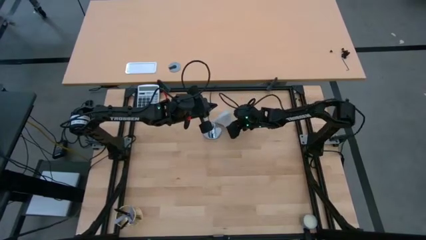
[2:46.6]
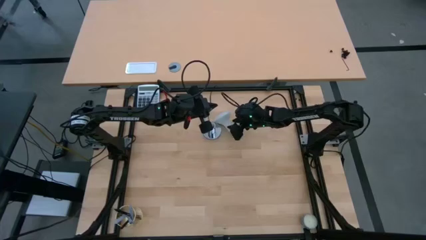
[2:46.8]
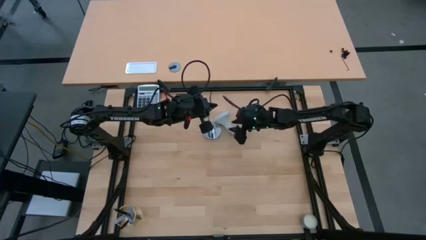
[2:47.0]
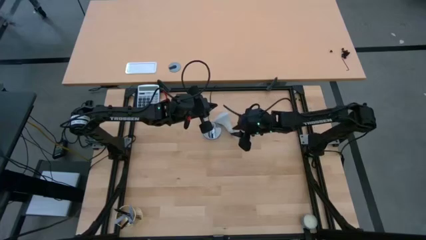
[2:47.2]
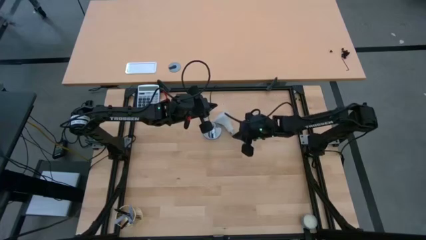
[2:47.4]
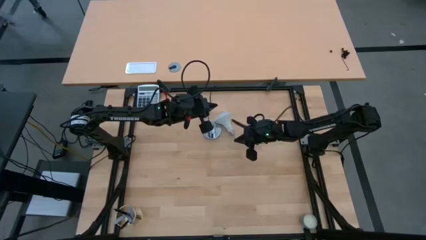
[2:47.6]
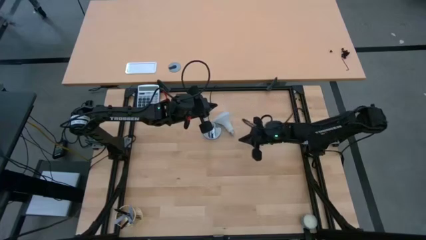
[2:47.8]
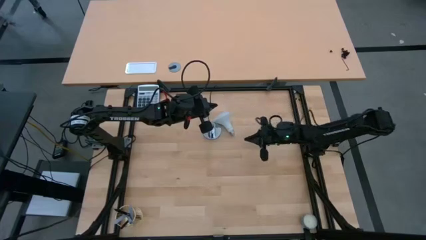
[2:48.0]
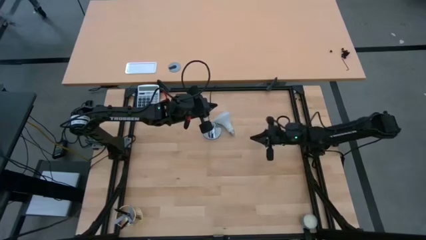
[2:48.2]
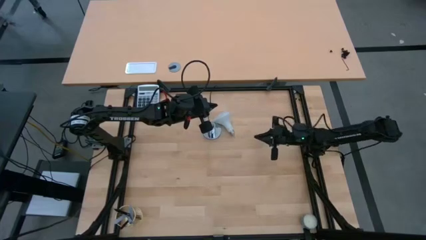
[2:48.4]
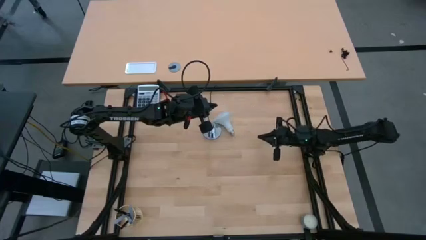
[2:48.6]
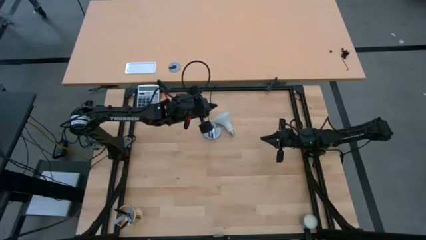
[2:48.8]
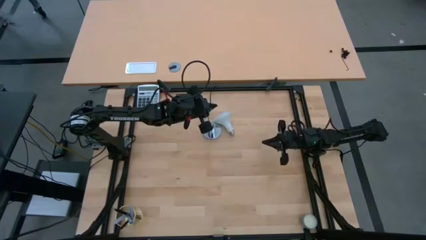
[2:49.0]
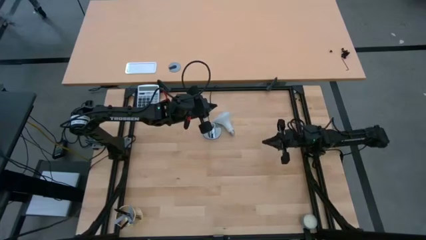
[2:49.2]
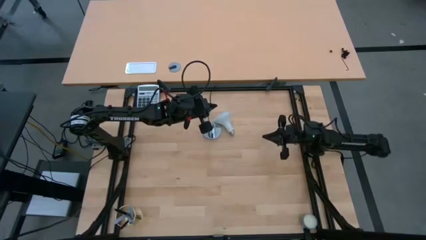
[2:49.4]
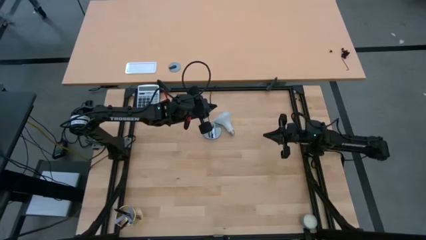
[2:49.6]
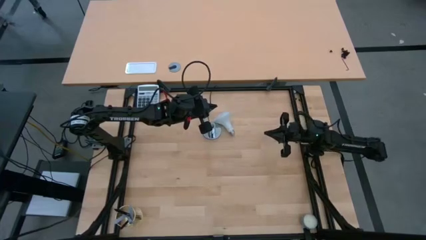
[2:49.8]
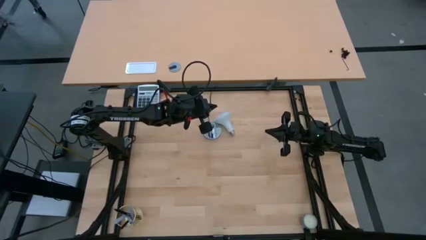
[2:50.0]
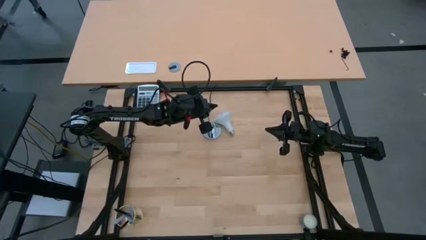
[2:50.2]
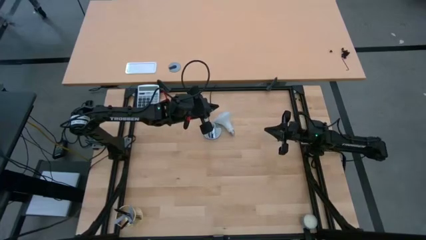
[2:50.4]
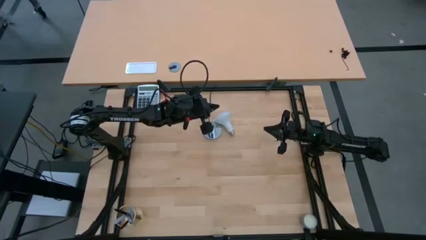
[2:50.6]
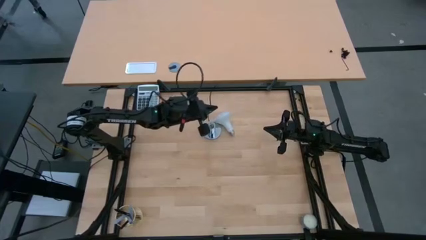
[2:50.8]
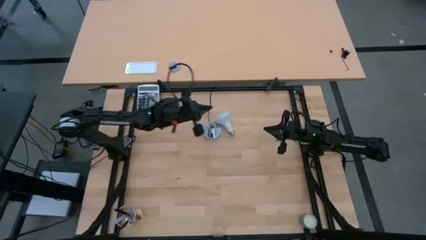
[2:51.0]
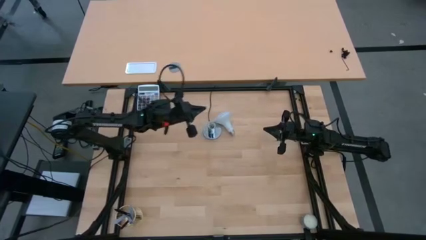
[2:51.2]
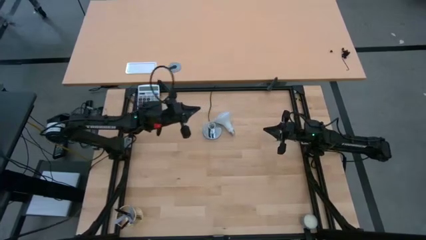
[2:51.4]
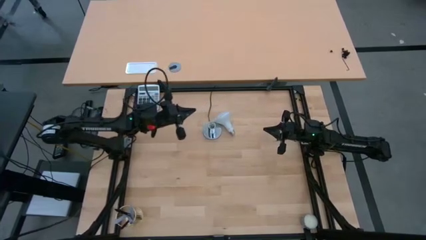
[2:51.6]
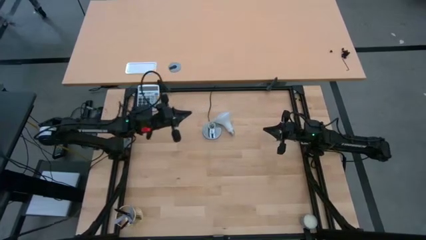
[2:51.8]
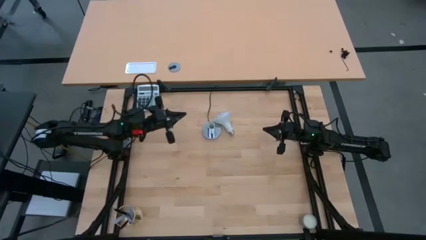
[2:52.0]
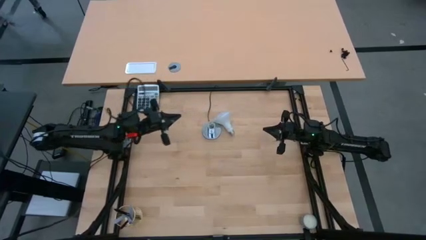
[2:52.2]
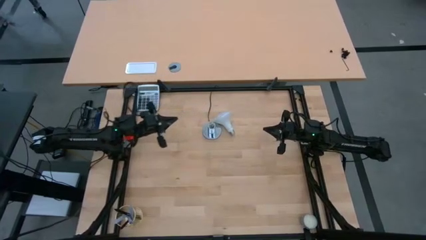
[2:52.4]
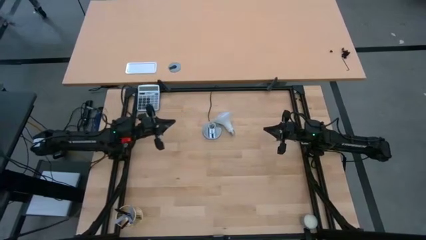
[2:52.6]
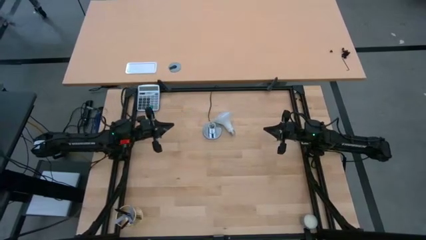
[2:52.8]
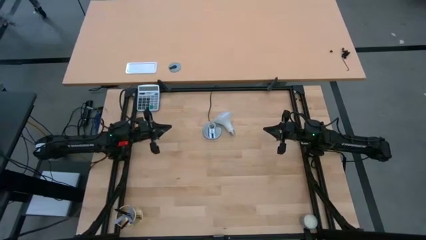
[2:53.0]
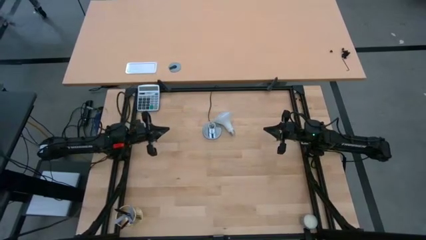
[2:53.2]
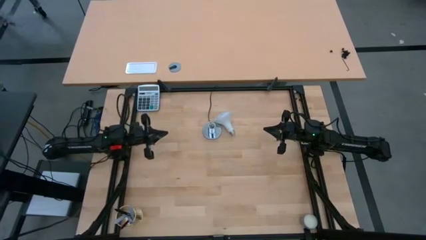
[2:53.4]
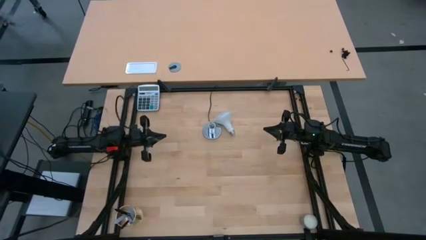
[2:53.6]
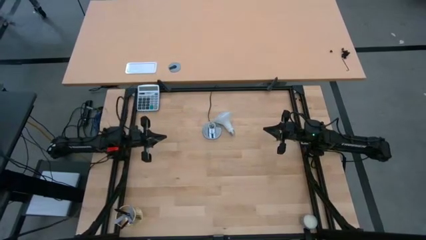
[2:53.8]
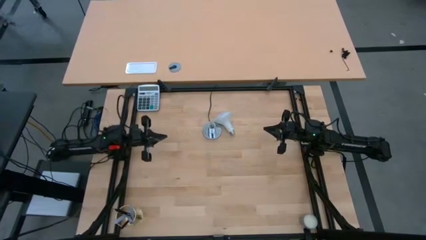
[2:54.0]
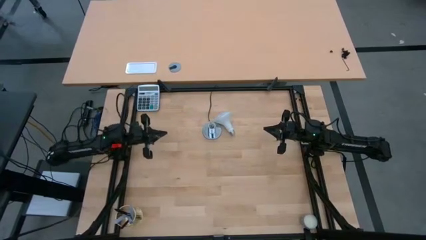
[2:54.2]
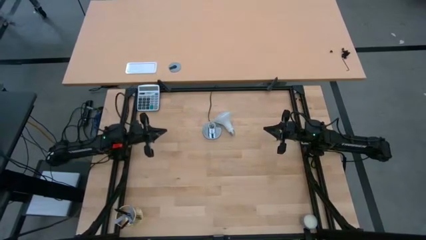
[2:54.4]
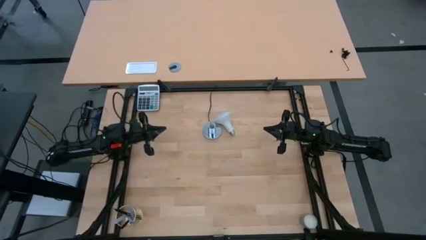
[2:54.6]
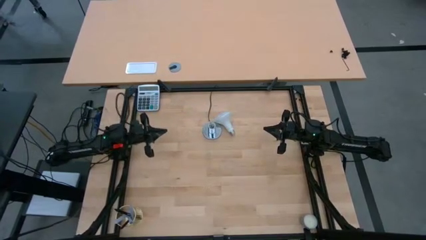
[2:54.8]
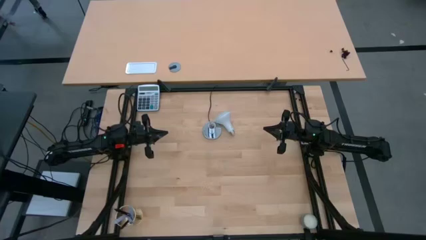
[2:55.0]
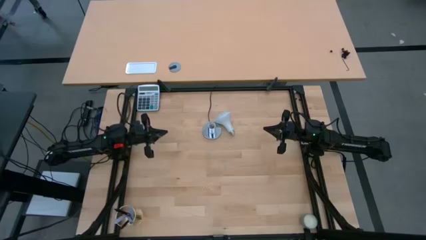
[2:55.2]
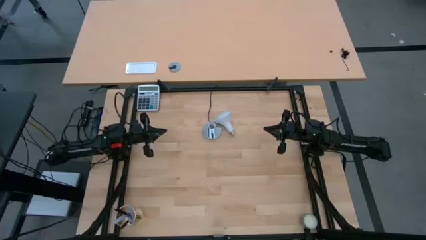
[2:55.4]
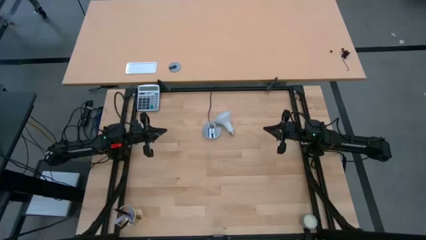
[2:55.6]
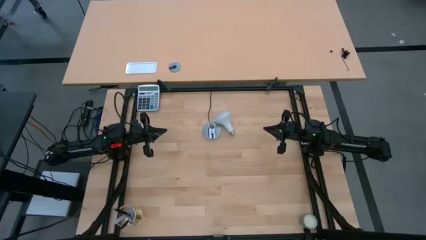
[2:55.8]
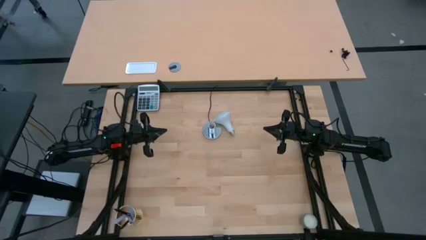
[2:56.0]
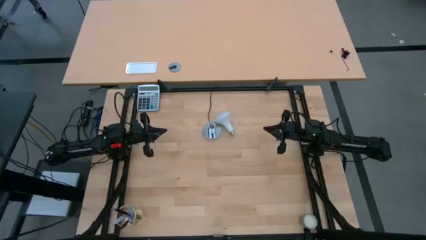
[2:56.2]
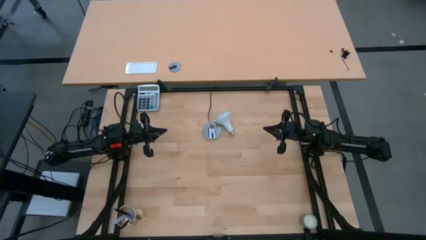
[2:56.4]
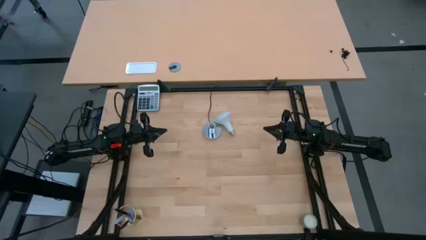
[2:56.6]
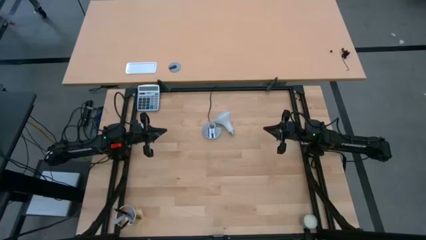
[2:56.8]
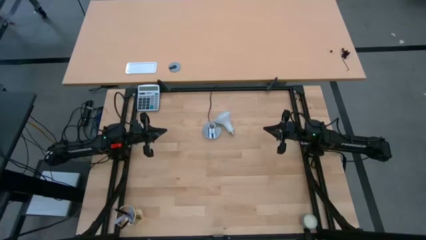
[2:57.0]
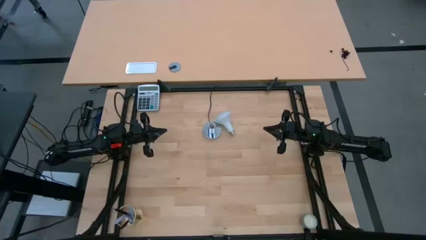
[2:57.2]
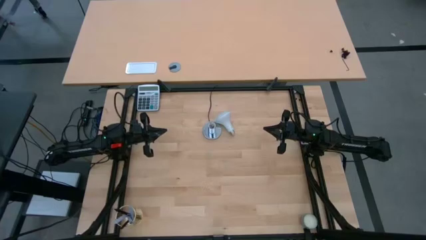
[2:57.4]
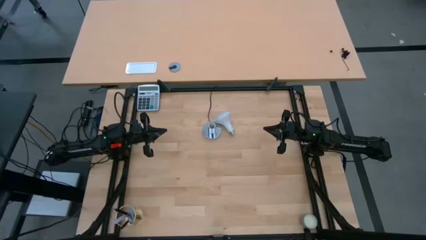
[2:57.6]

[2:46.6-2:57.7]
Task: Screw lightbulb
Return to Home Position

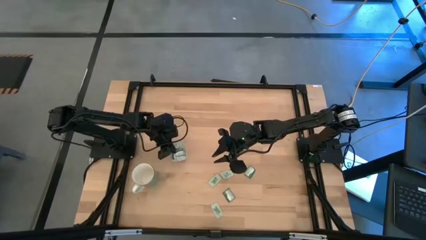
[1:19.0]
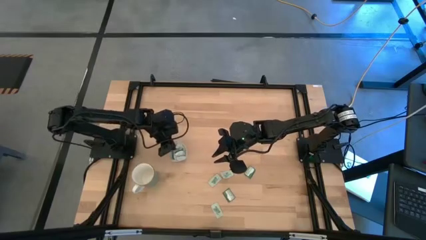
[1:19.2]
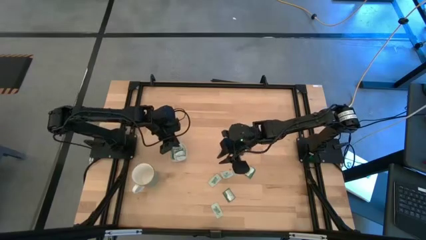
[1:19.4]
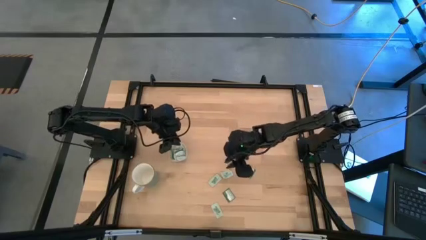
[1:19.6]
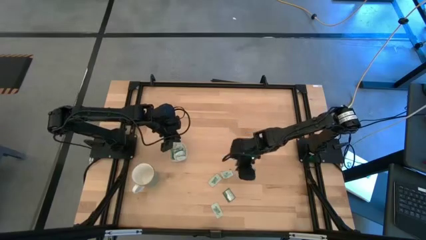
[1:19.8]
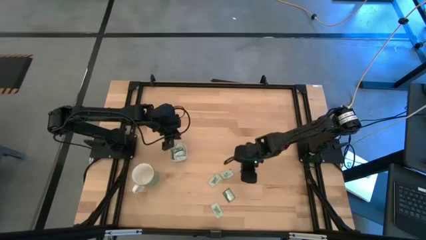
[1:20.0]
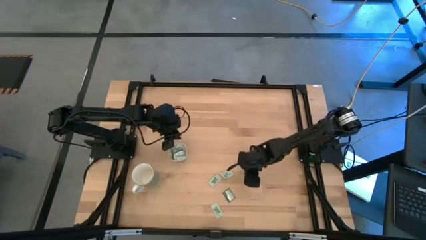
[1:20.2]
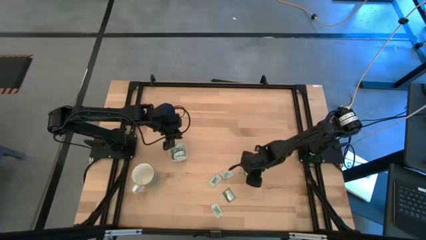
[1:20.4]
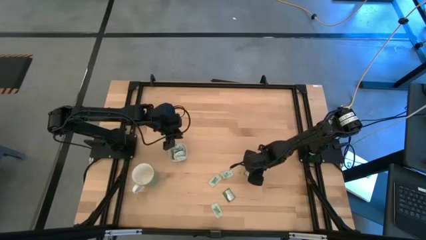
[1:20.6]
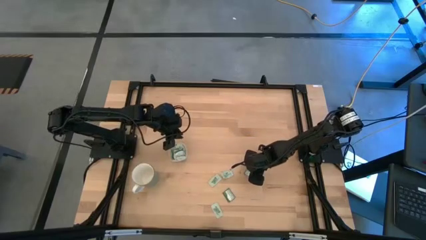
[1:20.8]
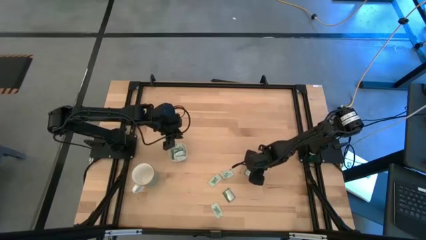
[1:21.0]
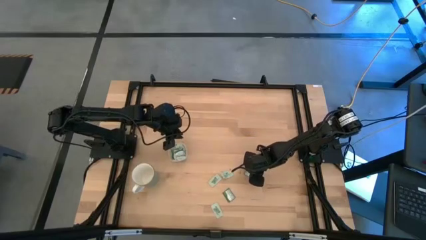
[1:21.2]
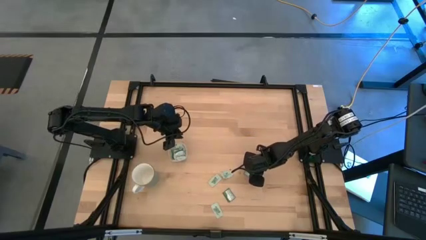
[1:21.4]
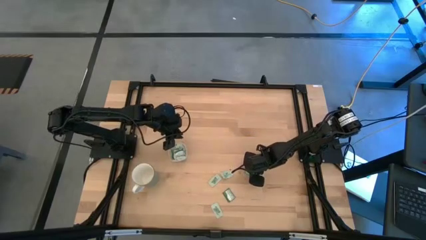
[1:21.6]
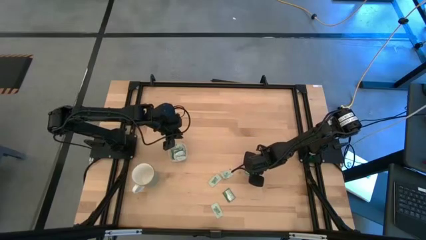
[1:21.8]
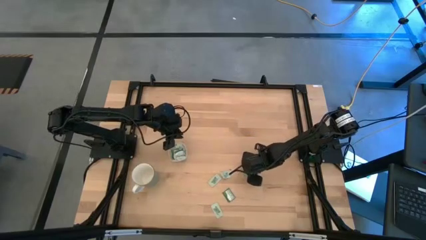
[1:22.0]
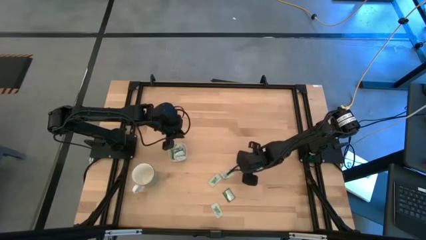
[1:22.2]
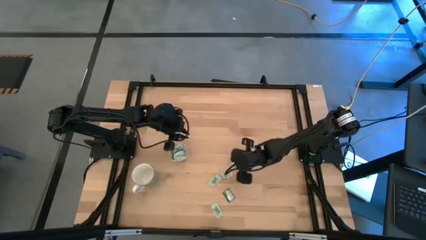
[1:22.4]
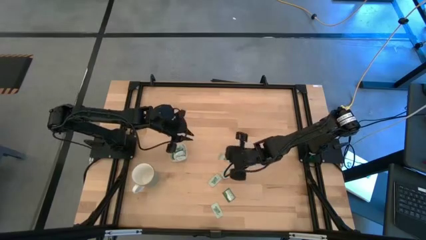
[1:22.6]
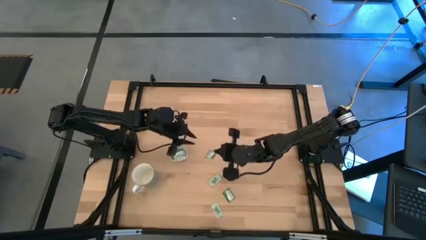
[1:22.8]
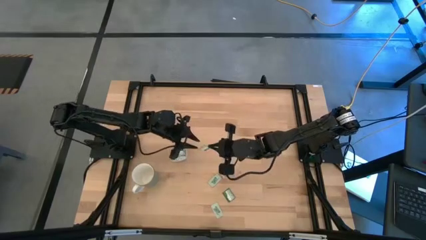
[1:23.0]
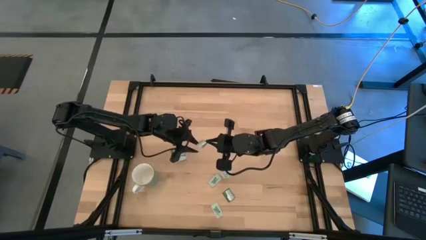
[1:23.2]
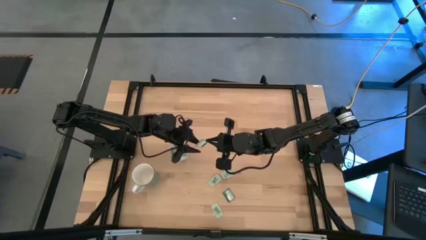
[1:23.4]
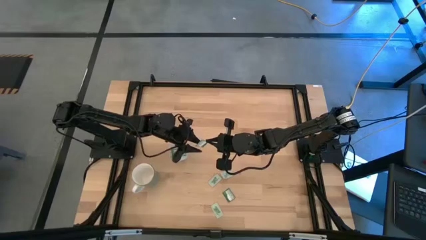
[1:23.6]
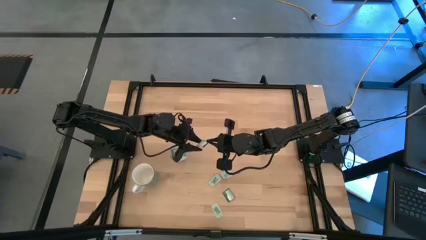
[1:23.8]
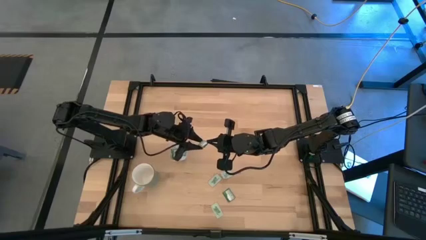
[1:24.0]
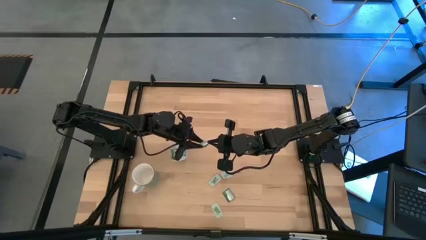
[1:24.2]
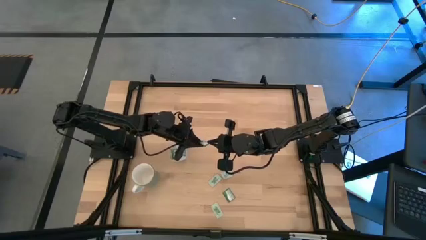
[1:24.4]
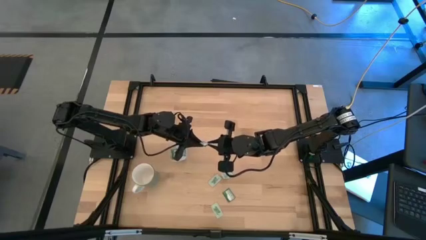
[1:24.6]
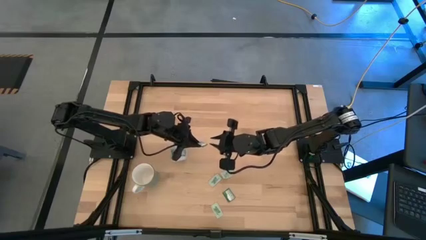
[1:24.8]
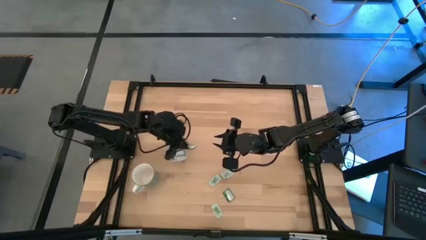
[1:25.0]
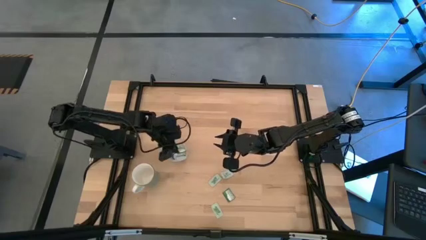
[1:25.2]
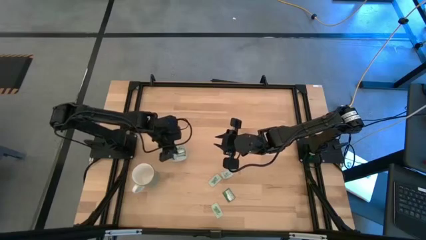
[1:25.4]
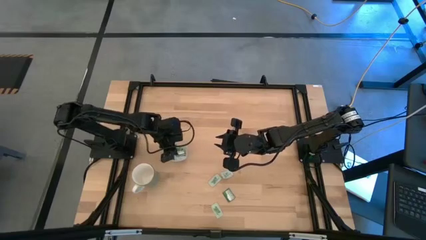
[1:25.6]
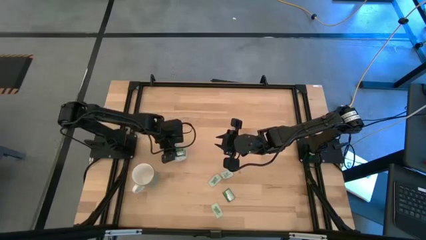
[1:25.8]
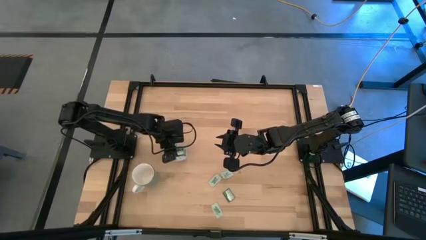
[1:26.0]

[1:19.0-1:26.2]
Task: Pick and place Stevia / Truvia into bins
Put the dark green stevia packet into the transparent container
